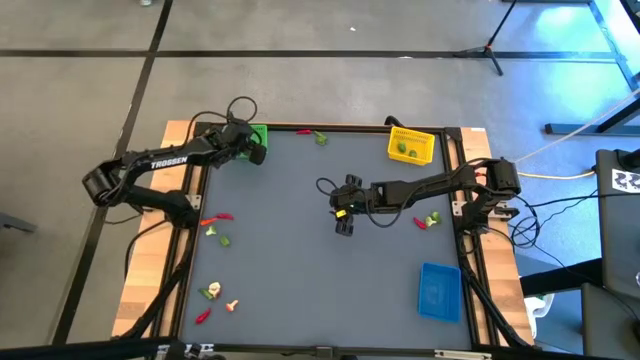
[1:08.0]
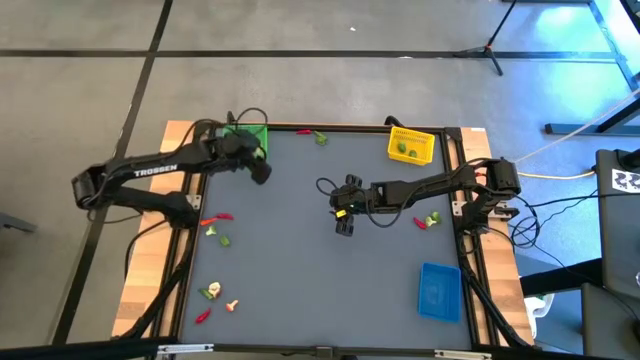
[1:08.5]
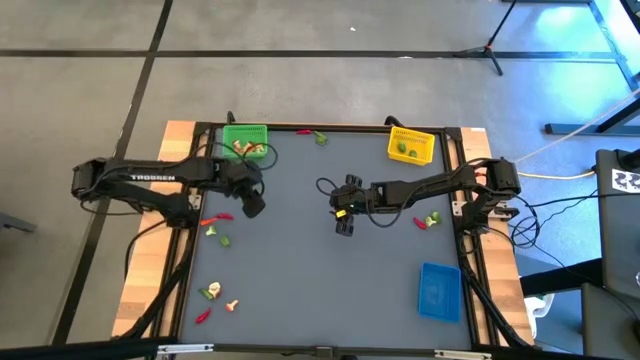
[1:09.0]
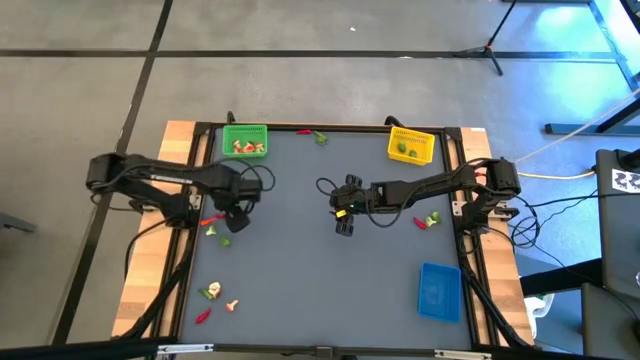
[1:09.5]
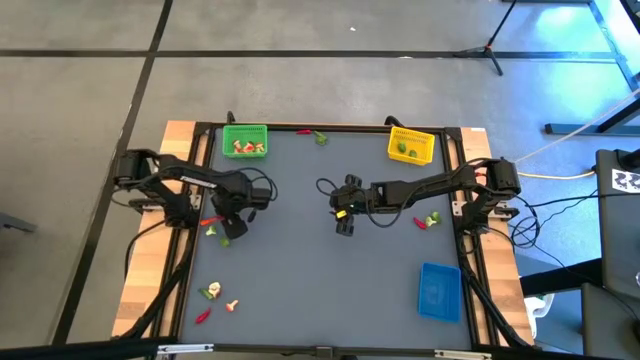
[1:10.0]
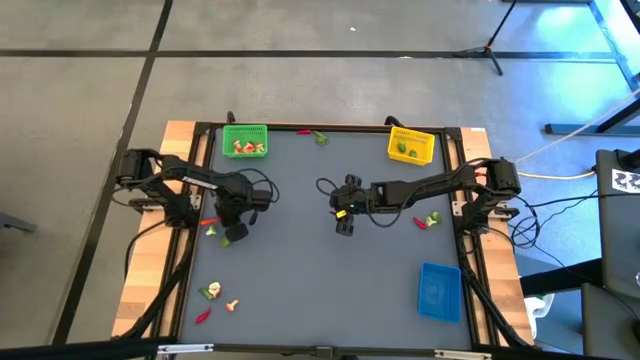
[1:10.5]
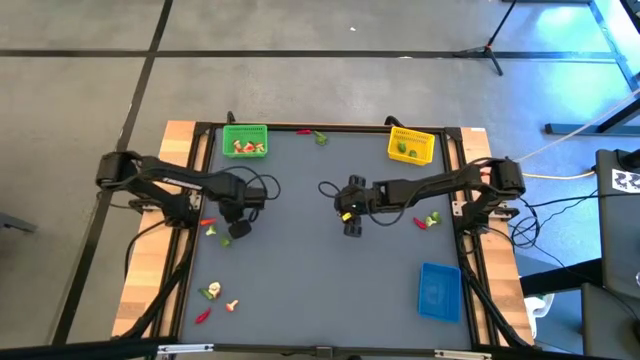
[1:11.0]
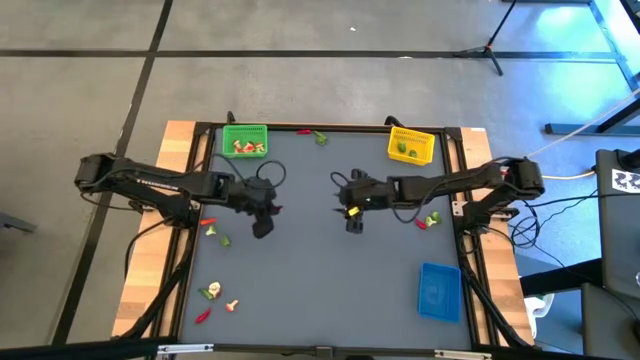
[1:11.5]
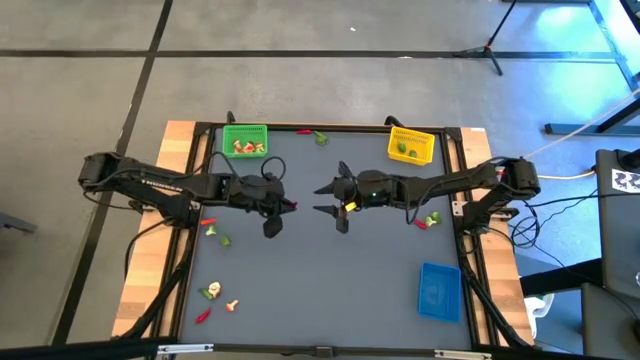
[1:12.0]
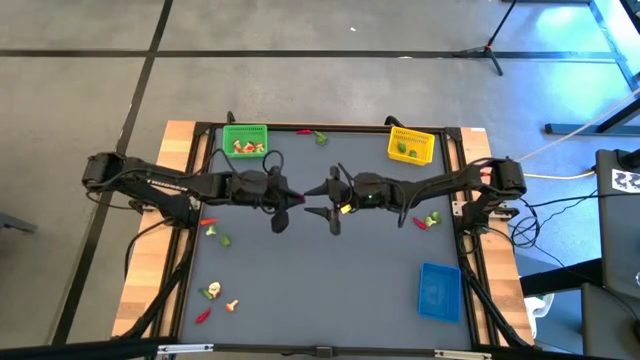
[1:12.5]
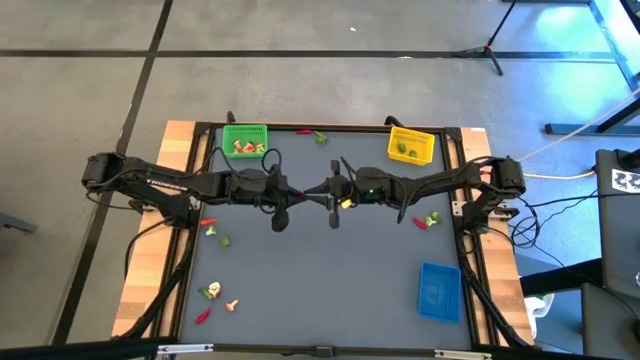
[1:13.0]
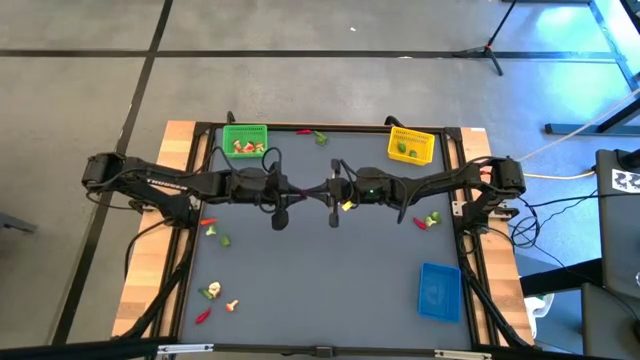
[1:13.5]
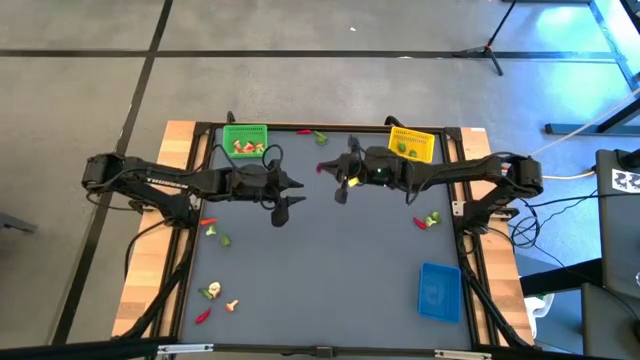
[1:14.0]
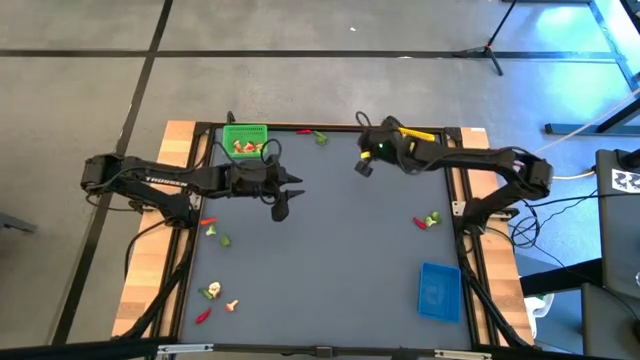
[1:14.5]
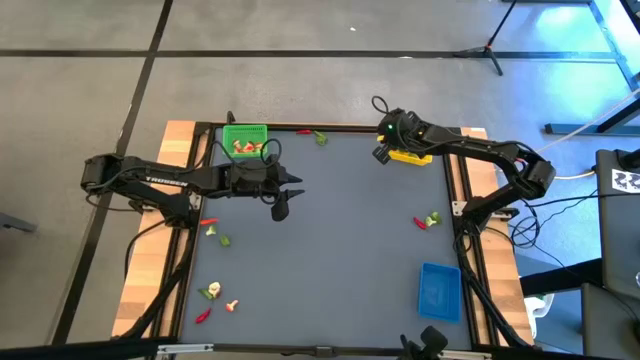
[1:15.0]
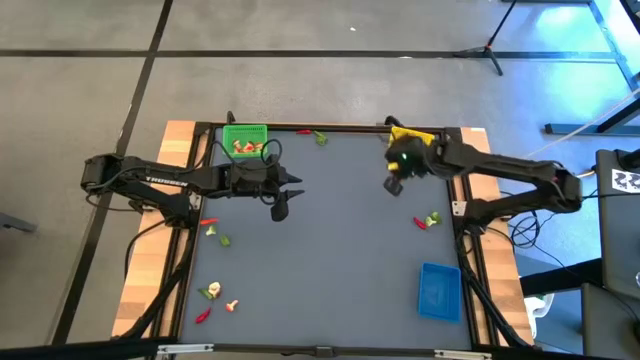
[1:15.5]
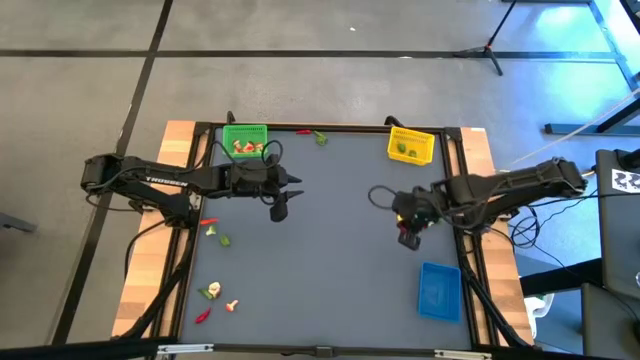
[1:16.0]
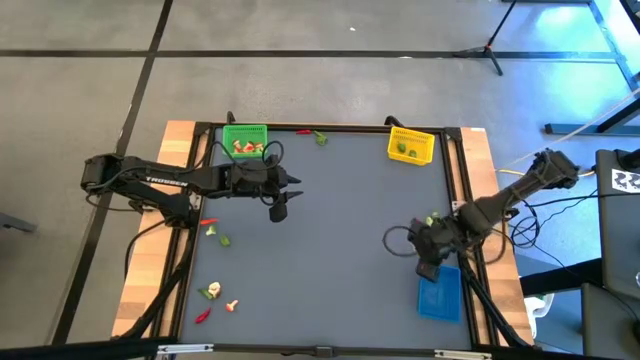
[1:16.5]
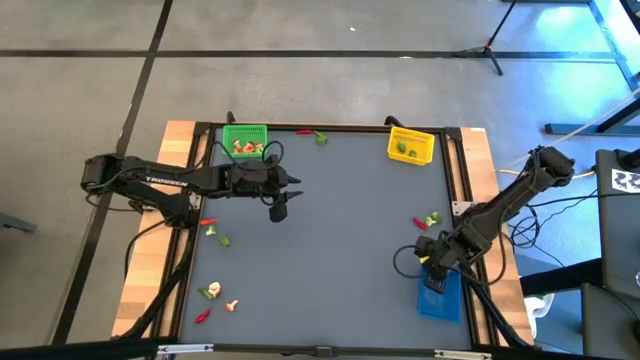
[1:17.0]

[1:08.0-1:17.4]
Task: Sort produce into baskets
Put the red chili pepper into the blue bin

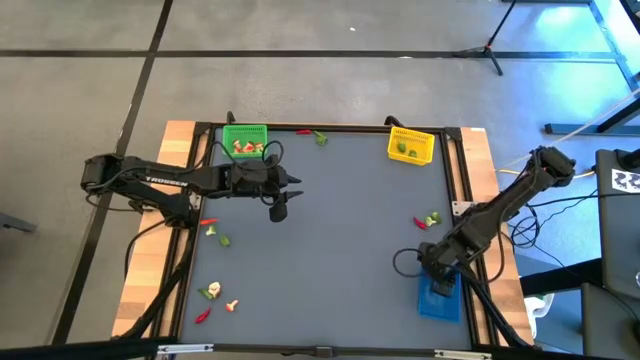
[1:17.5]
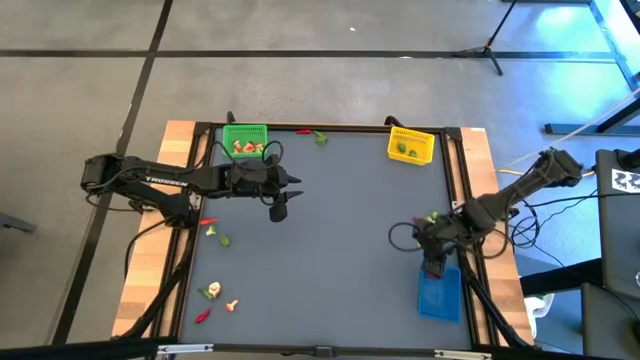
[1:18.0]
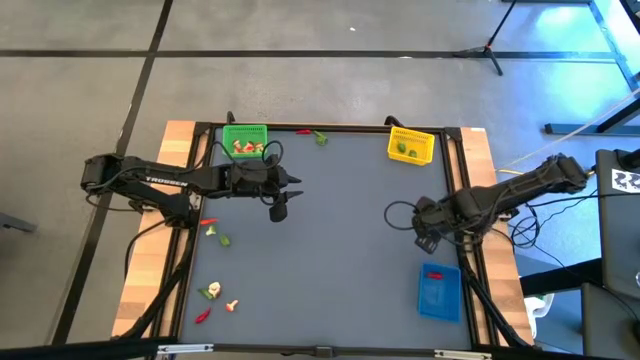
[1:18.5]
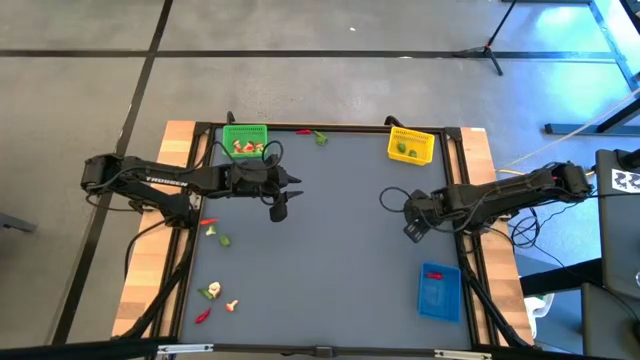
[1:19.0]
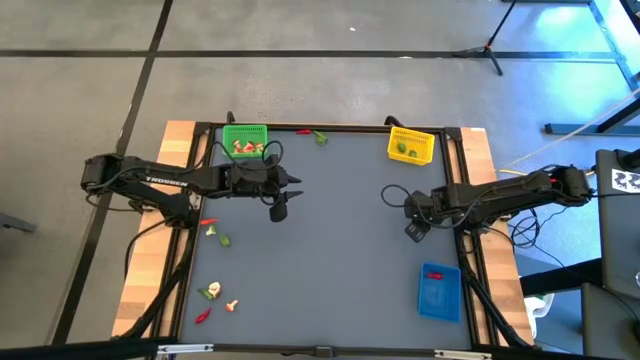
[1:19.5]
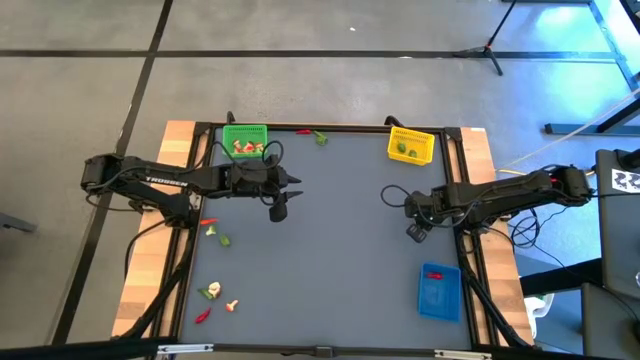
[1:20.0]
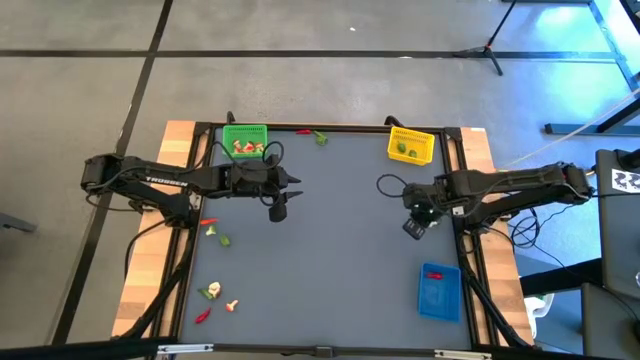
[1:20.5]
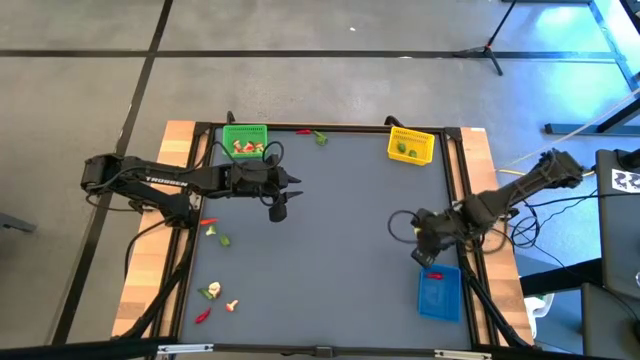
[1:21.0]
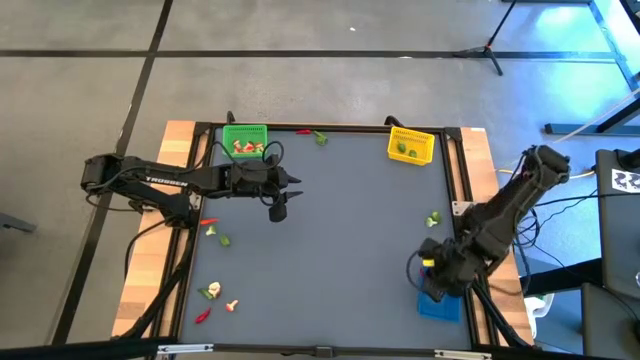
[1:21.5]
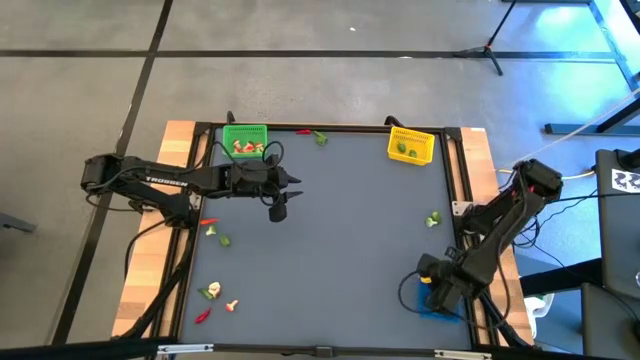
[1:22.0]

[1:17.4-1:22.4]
Put the red chili pepper into the blue bin

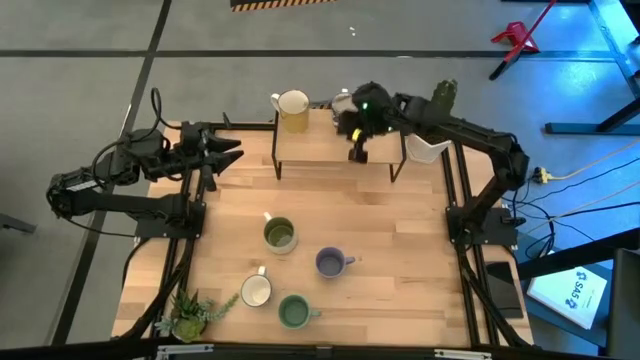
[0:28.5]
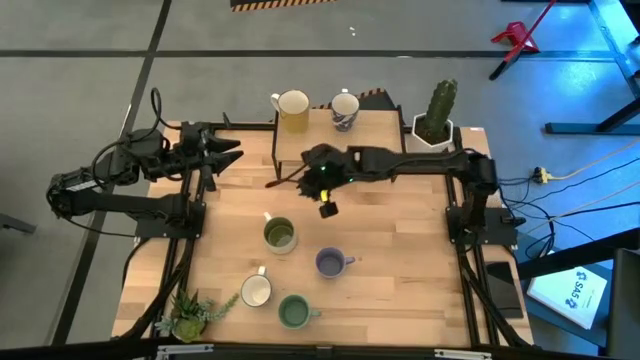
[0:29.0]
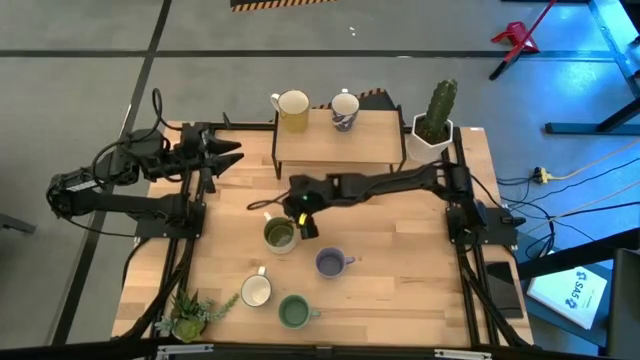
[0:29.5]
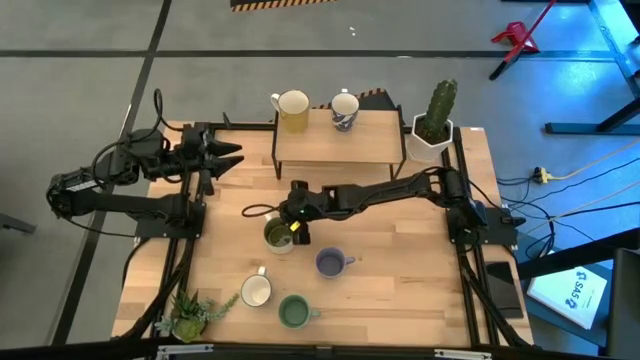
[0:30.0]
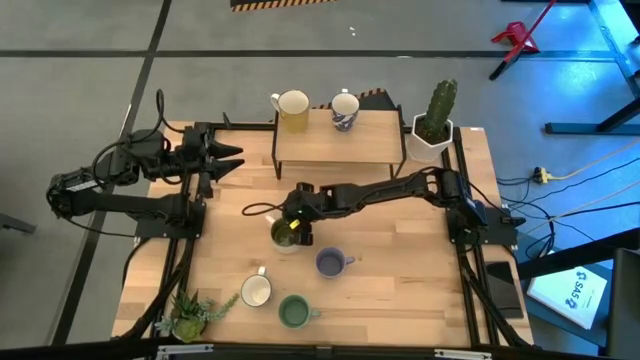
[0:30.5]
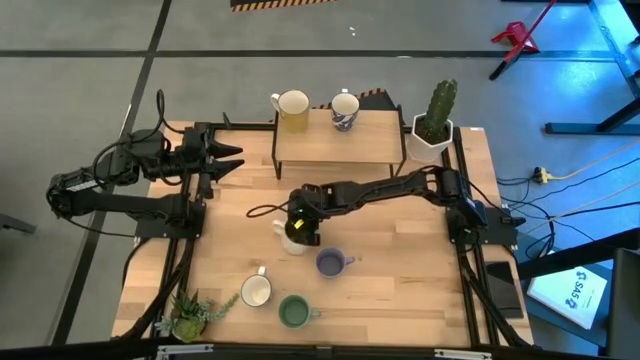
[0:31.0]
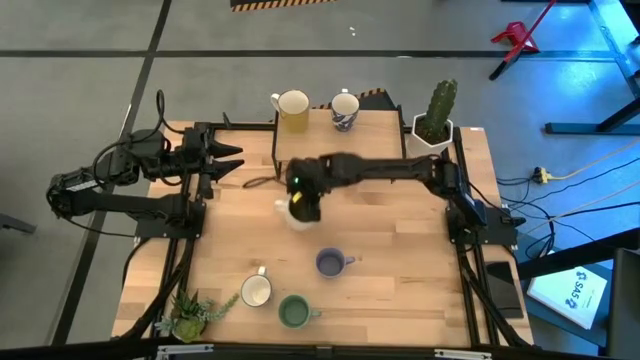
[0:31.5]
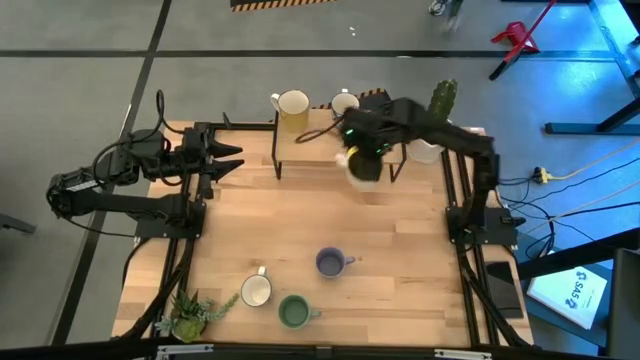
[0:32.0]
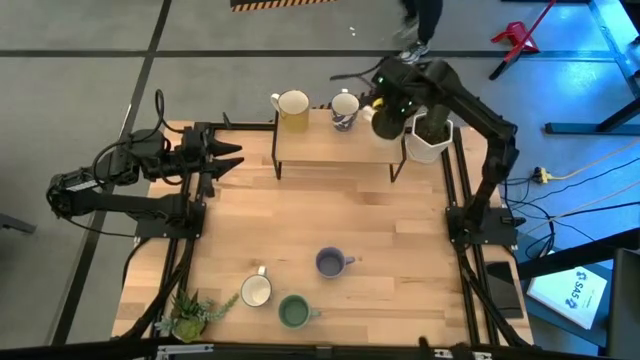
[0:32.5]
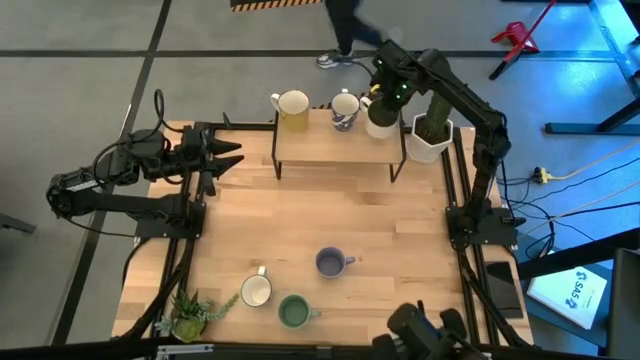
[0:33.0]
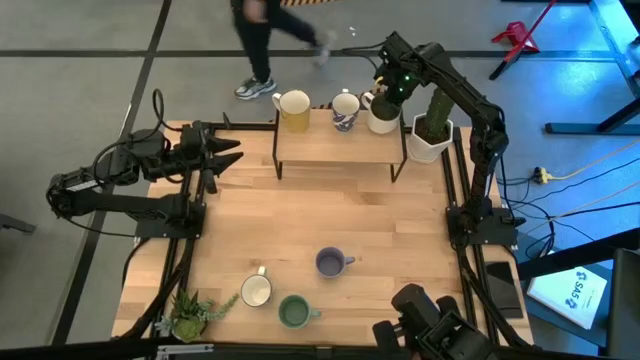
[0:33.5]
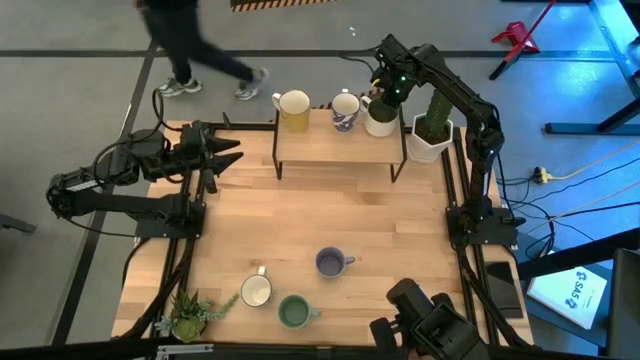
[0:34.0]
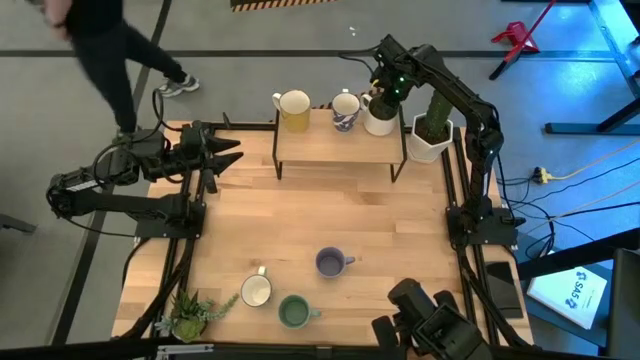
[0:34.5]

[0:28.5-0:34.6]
Task: Place coffee mugs
Put the white mug on the shelf
